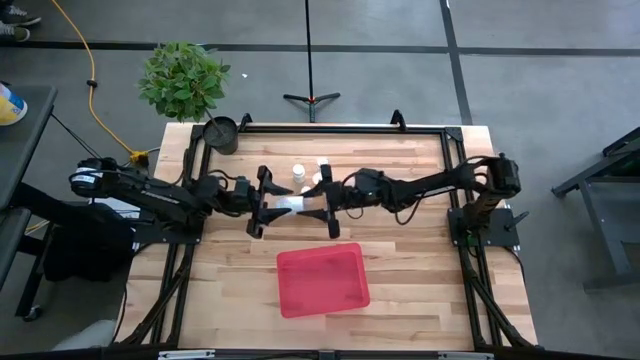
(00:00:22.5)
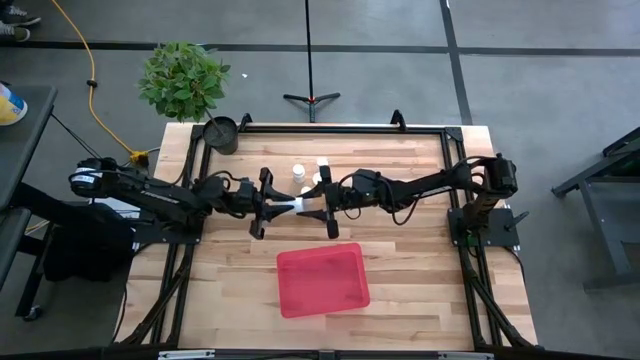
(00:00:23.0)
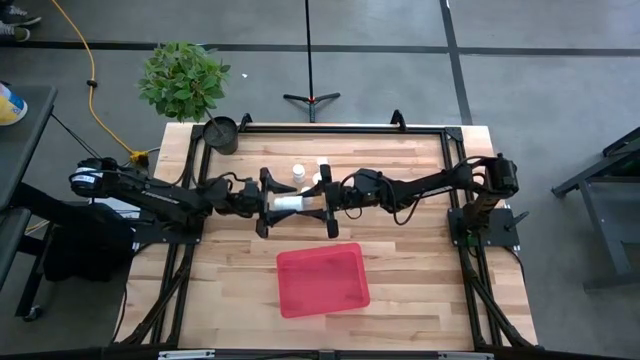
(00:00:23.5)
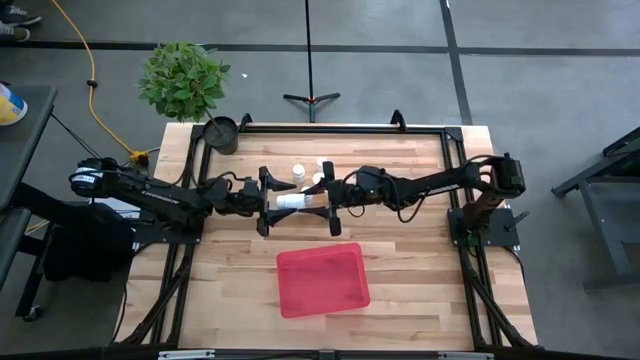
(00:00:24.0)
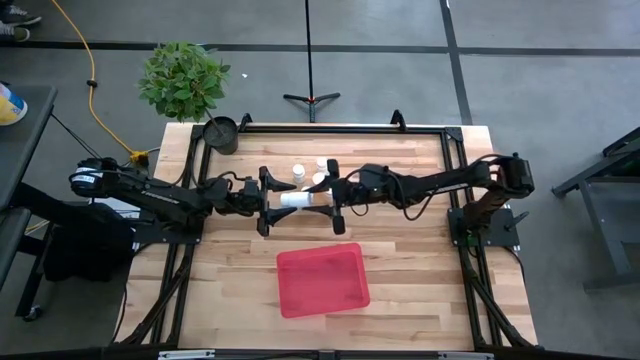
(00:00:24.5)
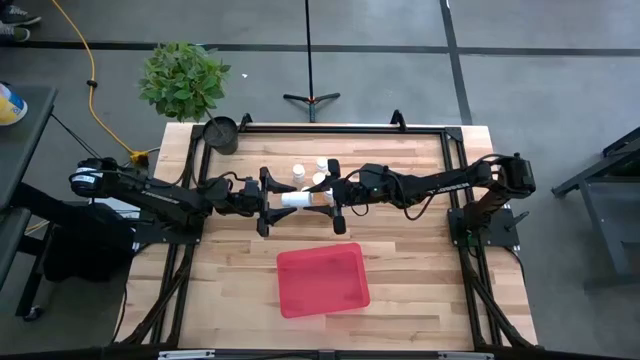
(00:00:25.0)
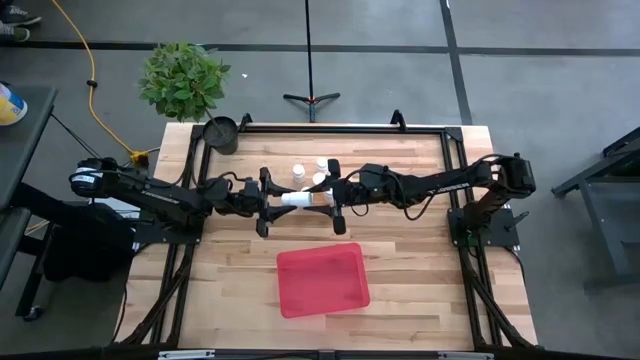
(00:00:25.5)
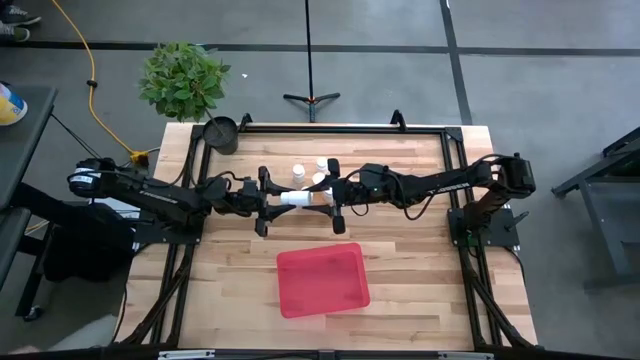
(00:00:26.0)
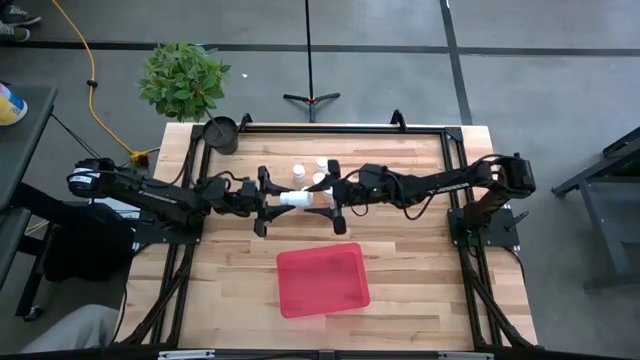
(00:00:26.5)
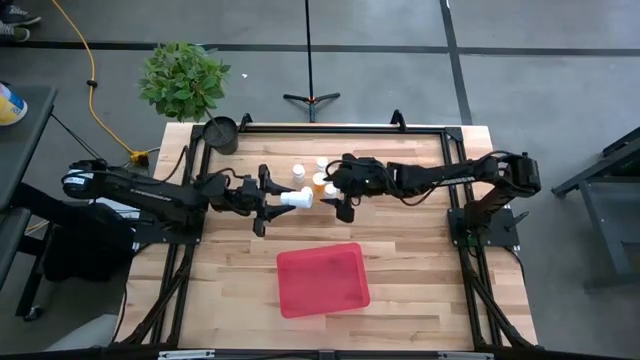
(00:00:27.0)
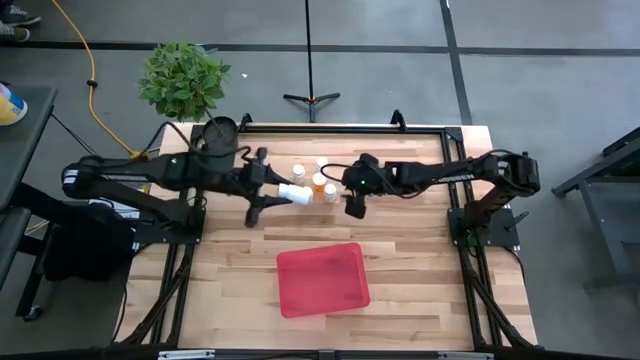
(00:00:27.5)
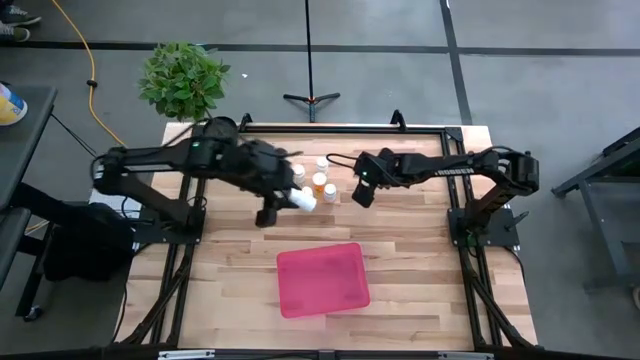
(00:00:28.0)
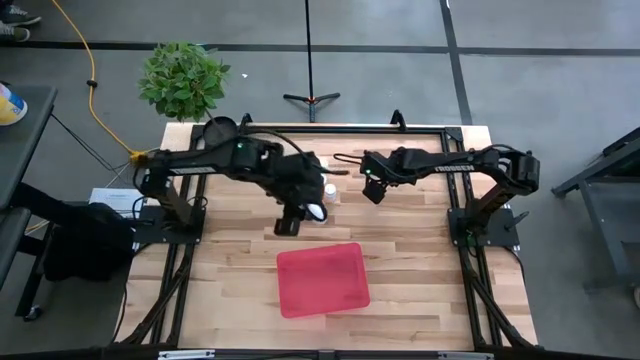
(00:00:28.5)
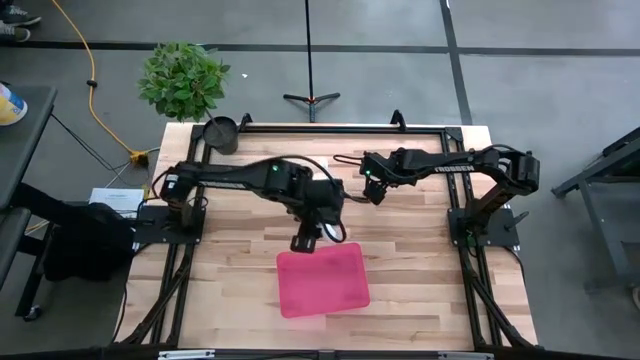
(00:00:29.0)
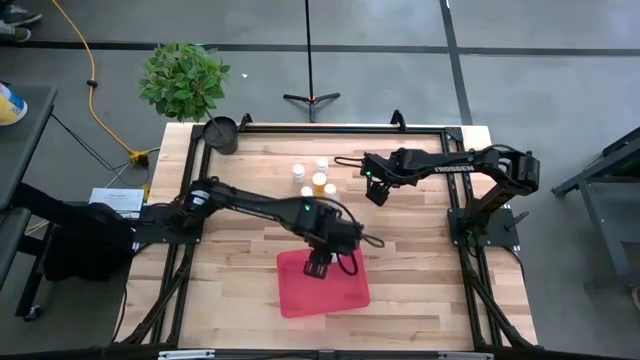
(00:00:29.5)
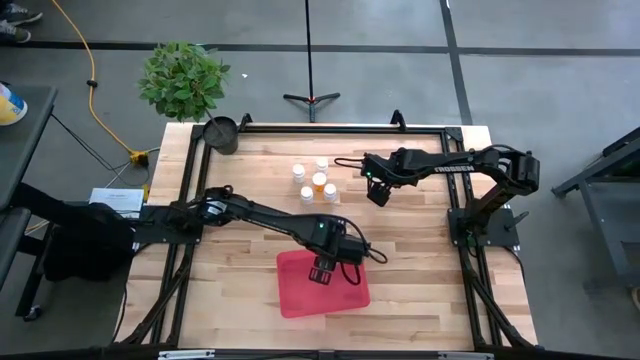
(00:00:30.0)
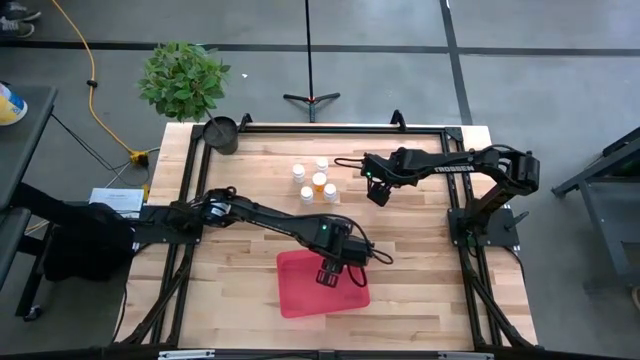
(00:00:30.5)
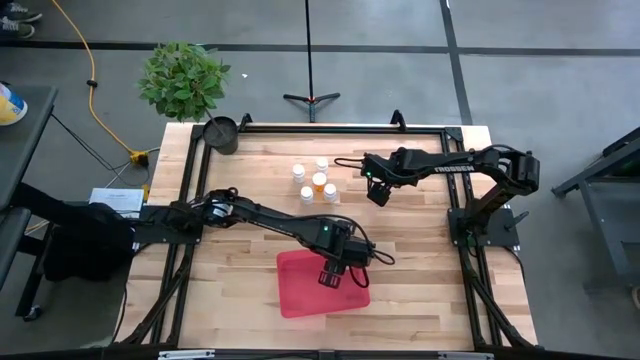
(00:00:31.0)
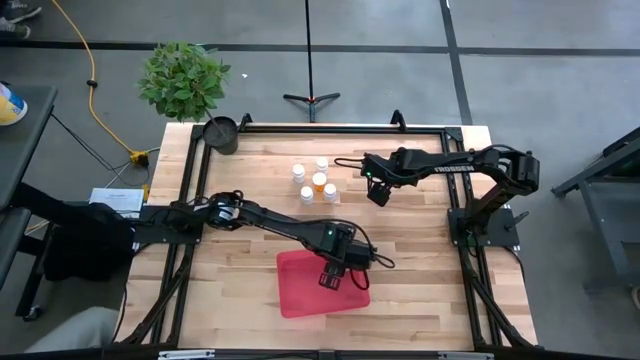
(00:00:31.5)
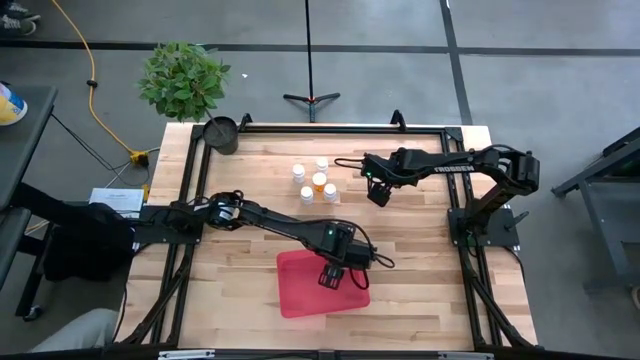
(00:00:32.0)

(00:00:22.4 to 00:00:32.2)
Task: Pick and place pill bottles into a basket
Put the white pill bottle into the red bin

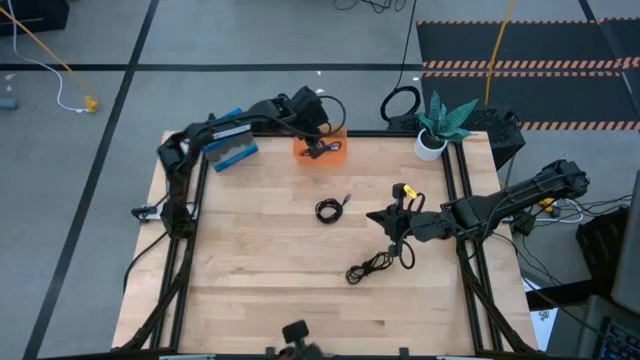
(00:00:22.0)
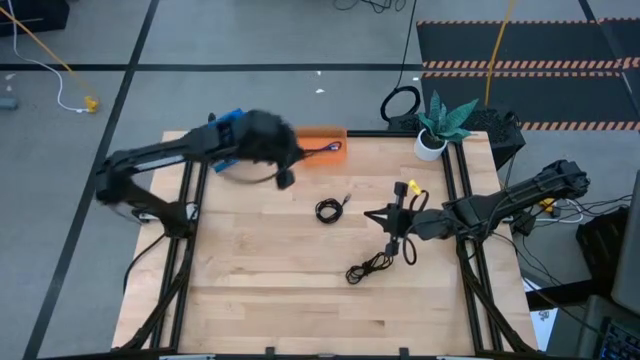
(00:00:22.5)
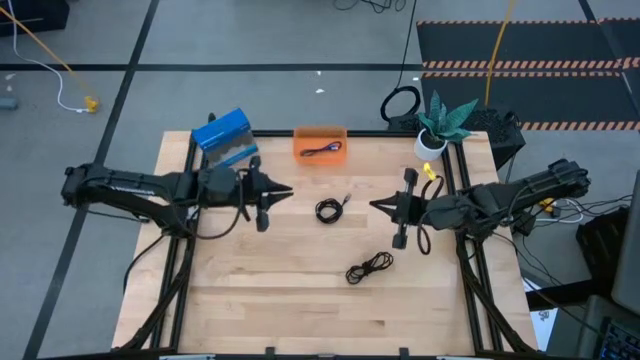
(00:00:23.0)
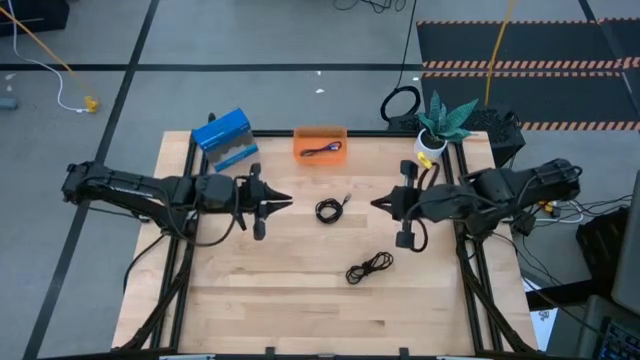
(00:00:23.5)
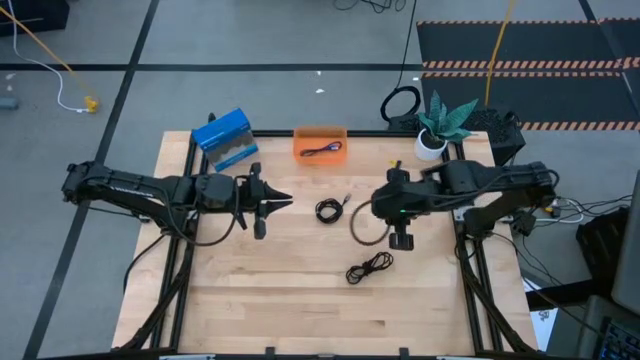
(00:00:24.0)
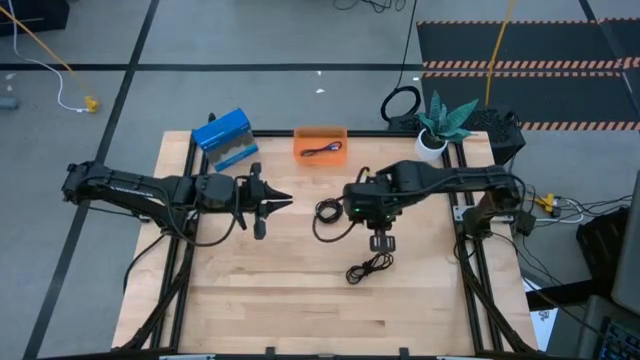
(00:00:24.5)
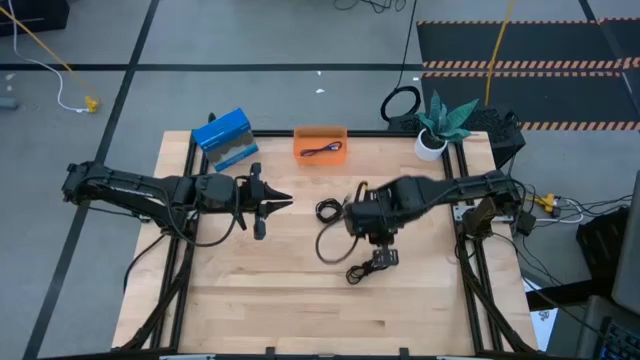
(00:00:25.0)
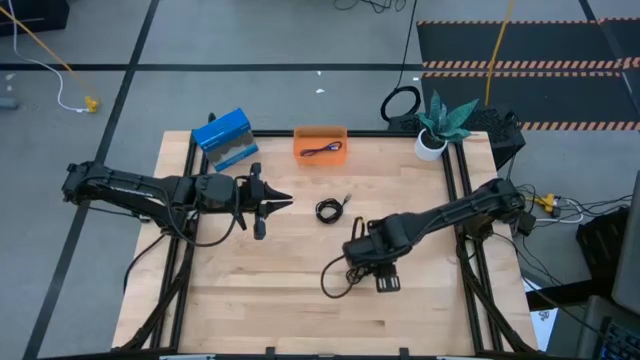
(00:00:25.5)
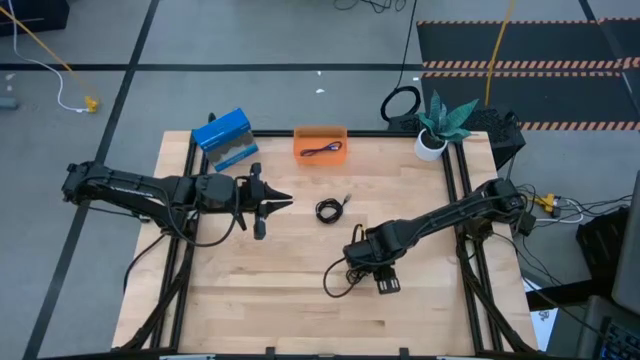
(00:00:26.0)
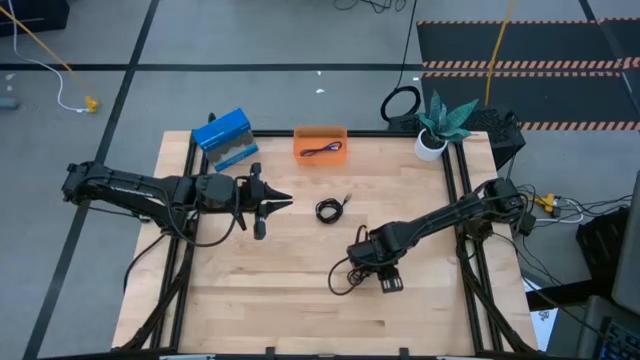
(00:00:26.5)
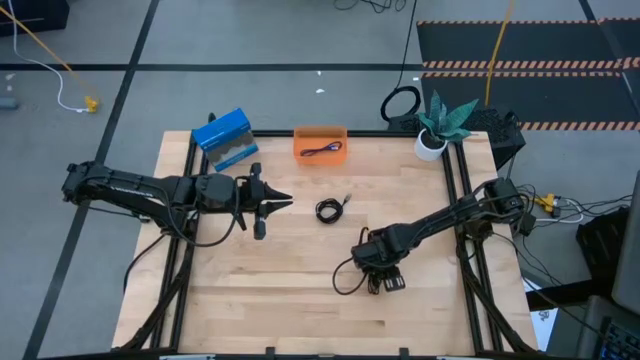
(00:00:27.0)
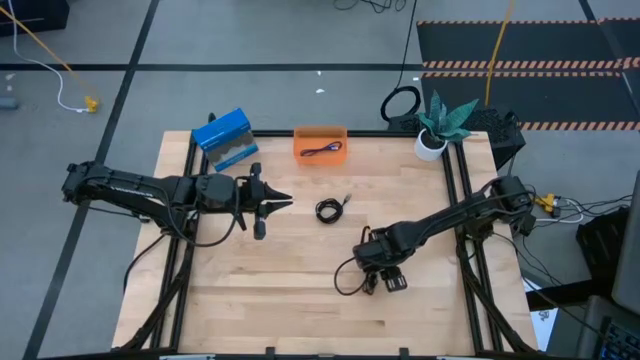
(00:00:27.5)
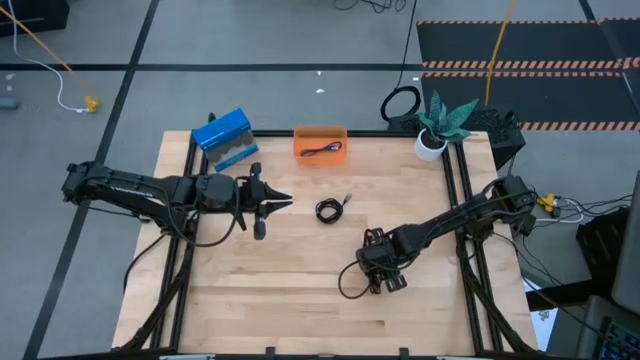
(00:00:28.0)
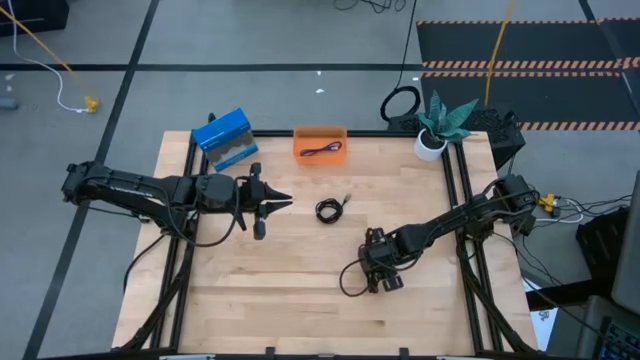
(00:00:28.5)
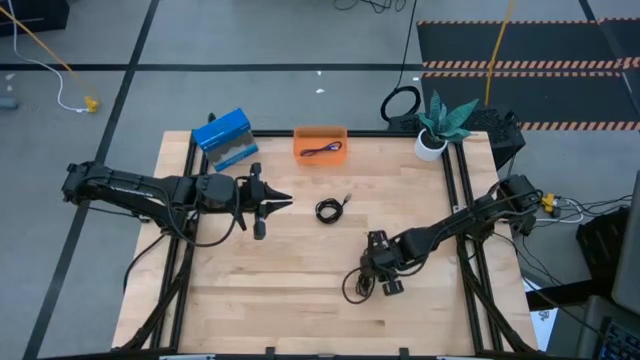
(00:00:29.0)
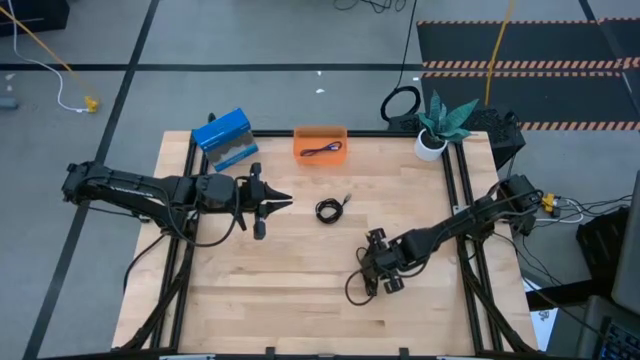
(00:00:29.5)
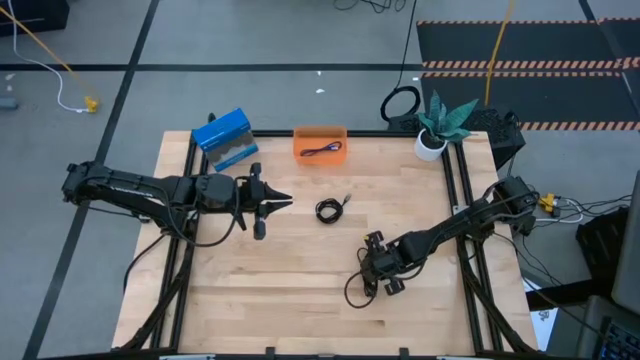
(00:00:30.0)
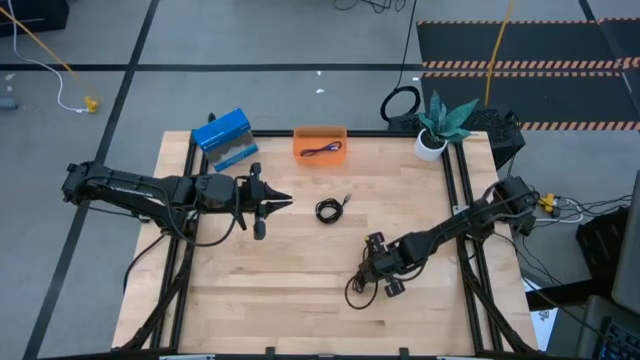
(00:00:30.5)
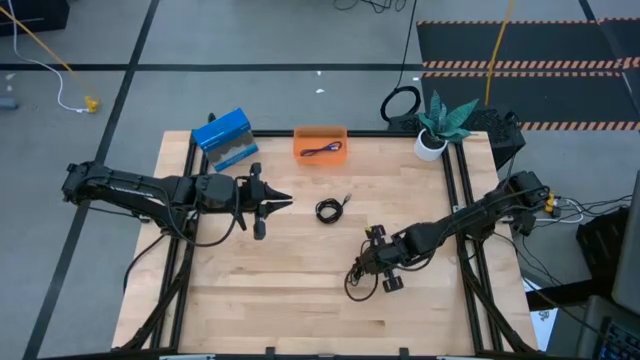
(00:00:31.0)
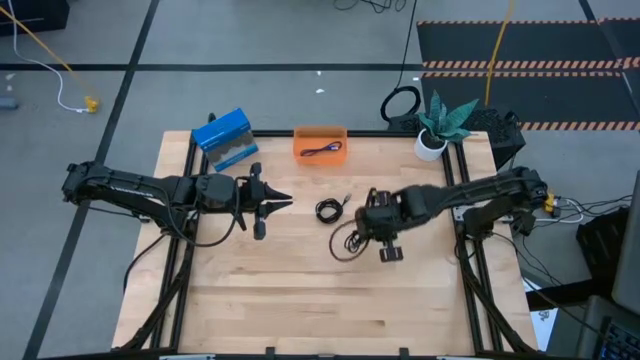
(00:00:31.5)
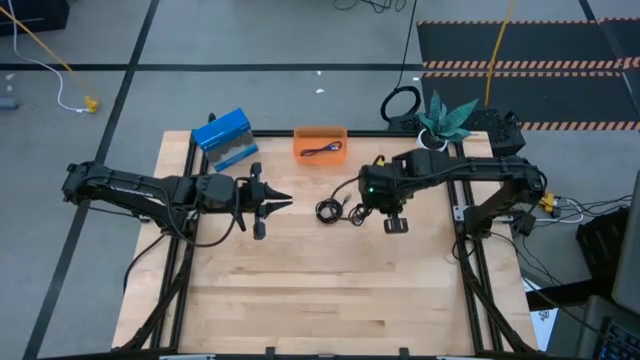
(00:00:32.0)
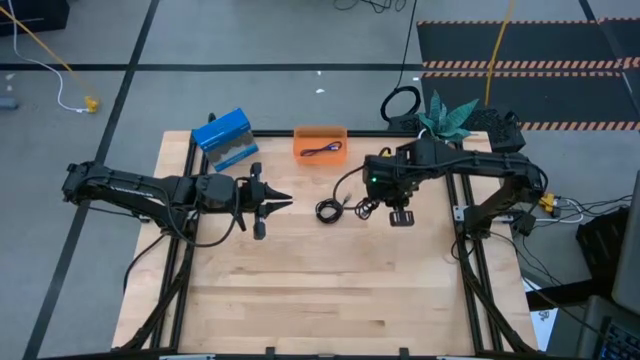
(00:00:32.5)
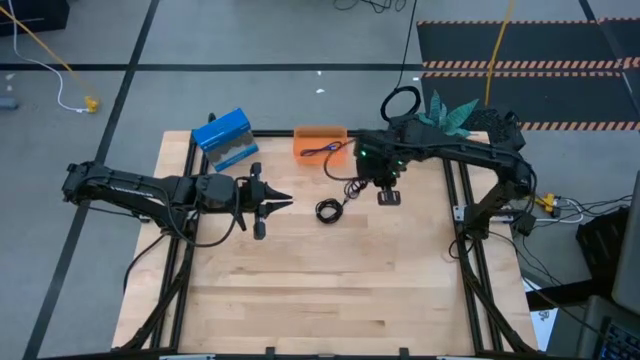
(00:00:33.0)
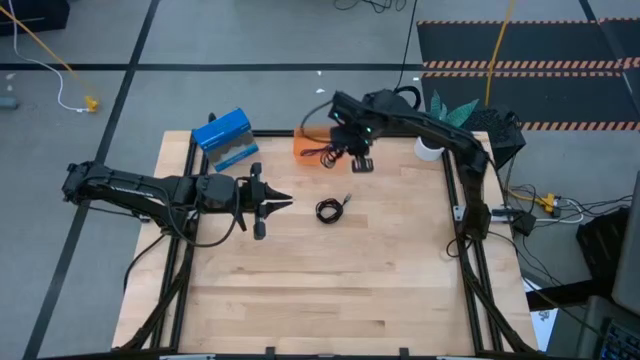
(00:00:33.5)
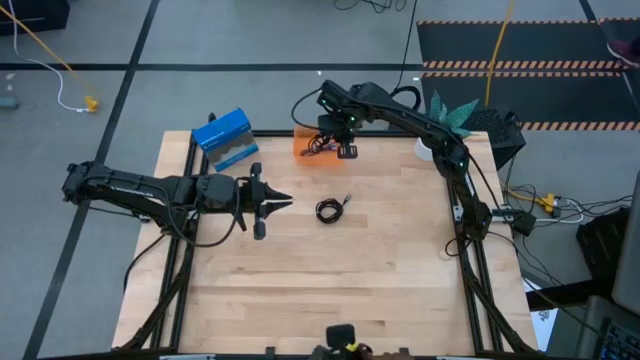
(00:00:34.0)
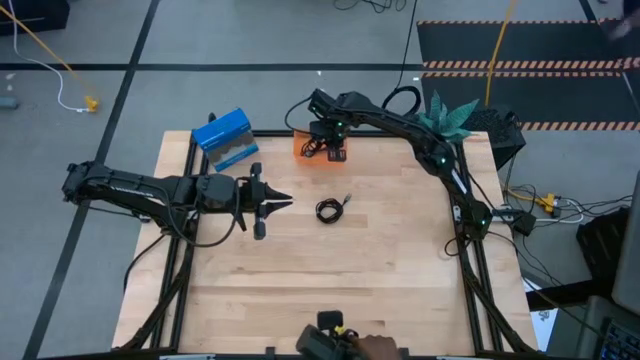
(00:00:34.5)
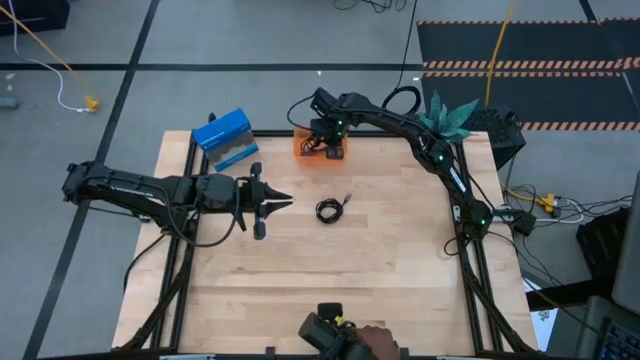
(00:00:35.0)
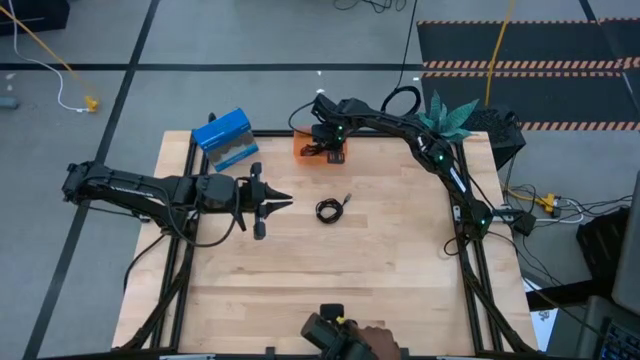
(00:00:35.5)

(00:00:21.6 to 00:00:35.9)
Task: Pick and place USB-C Cables
Put the bottom black charger cable into the orange bin
